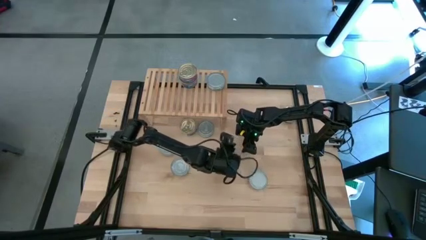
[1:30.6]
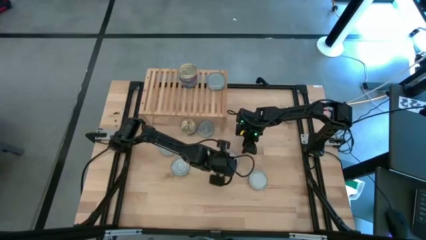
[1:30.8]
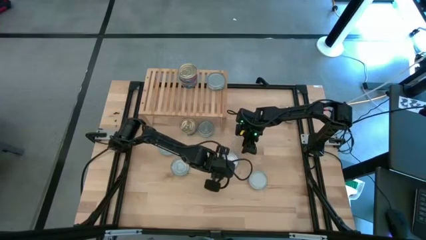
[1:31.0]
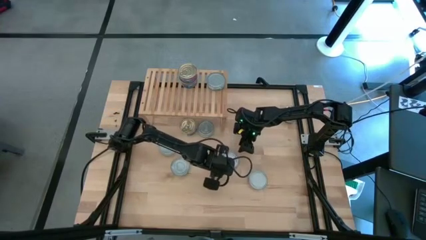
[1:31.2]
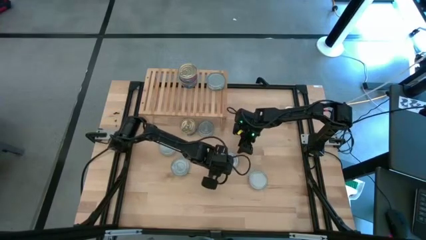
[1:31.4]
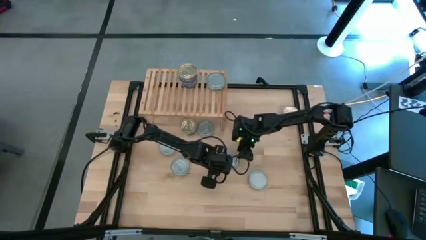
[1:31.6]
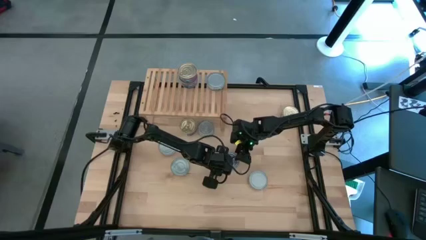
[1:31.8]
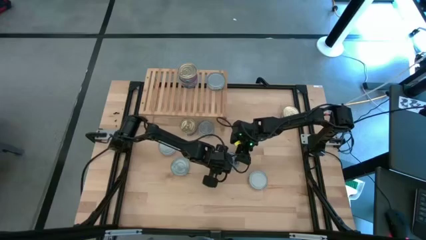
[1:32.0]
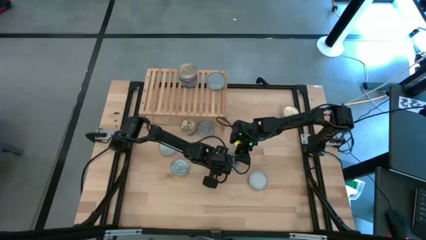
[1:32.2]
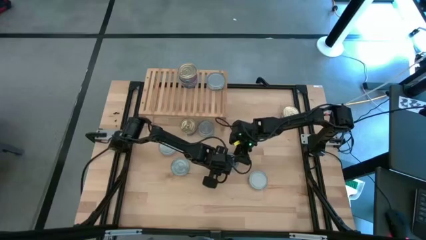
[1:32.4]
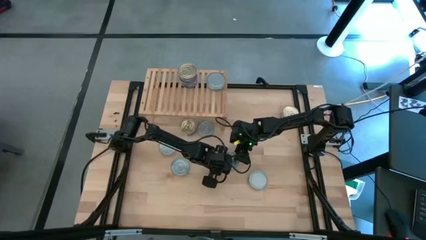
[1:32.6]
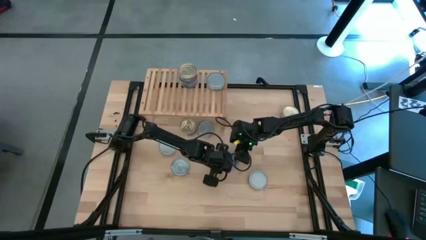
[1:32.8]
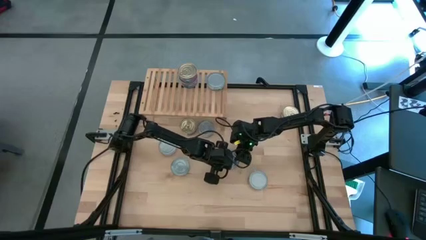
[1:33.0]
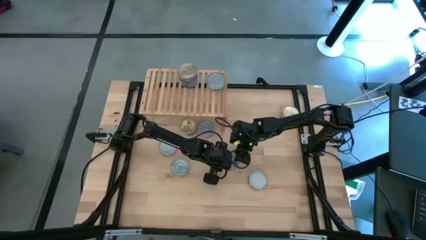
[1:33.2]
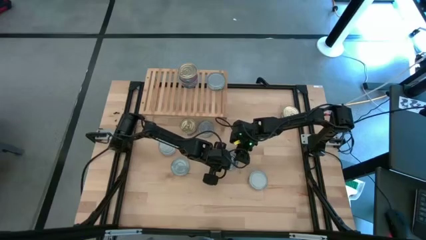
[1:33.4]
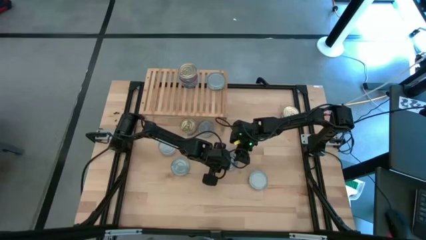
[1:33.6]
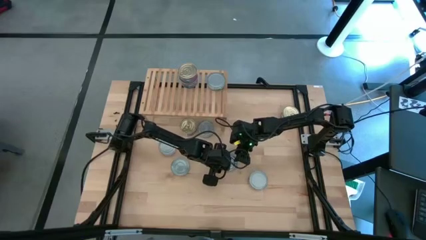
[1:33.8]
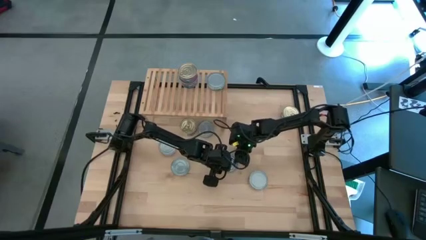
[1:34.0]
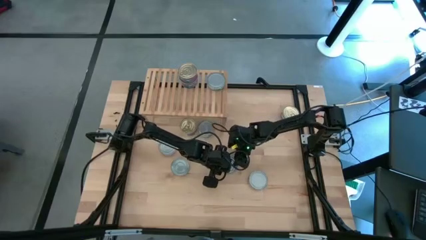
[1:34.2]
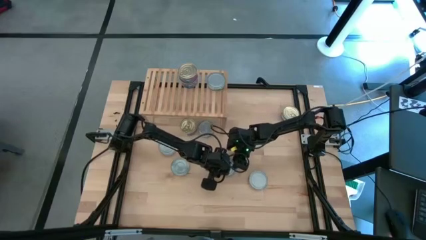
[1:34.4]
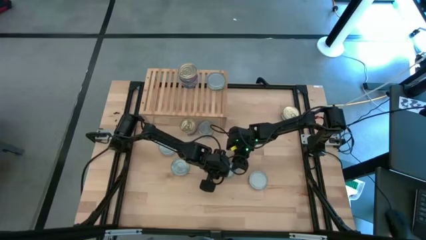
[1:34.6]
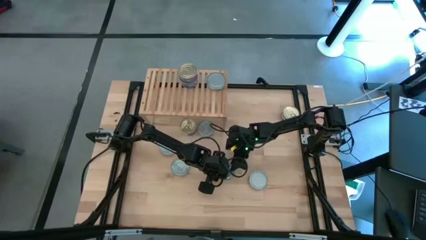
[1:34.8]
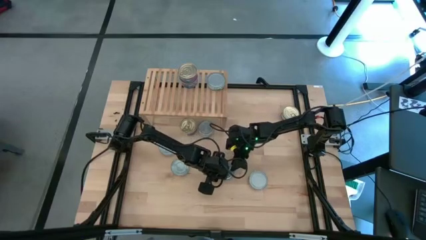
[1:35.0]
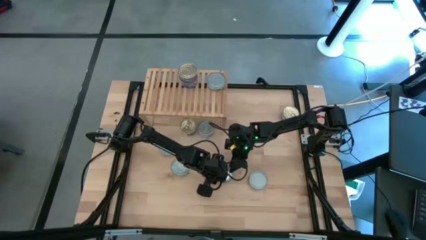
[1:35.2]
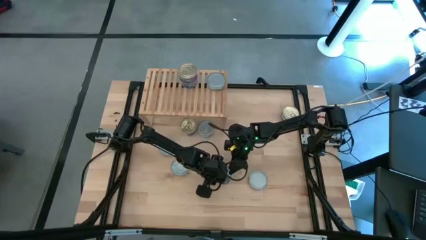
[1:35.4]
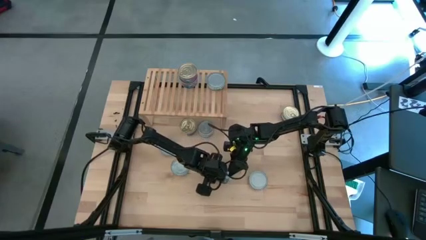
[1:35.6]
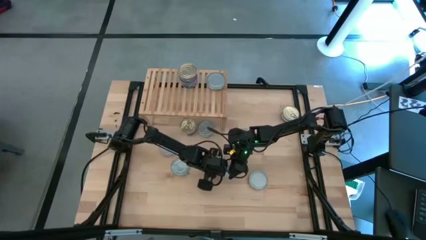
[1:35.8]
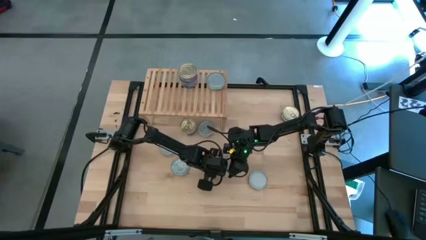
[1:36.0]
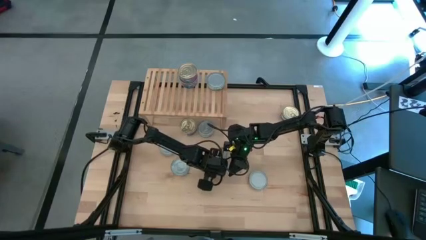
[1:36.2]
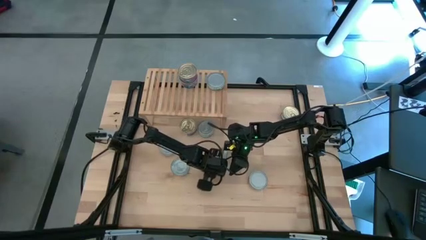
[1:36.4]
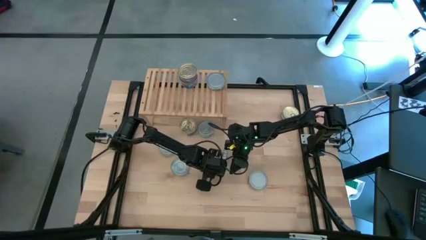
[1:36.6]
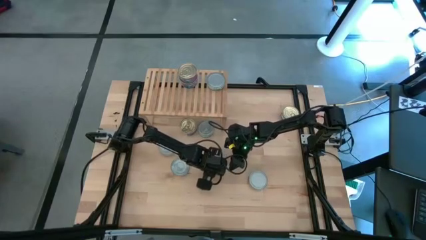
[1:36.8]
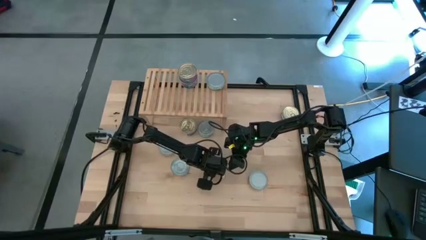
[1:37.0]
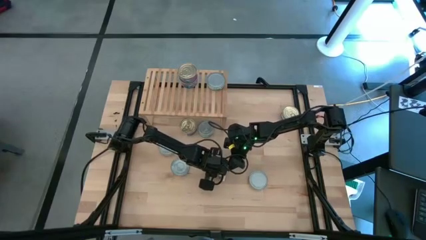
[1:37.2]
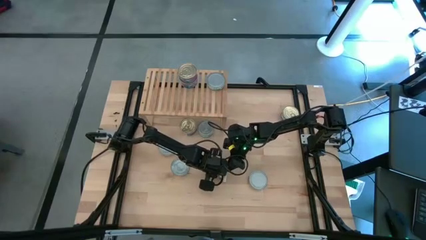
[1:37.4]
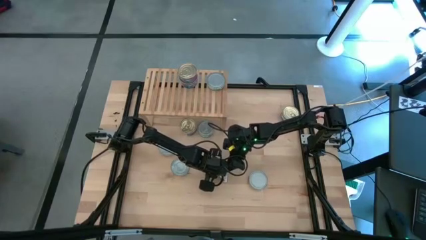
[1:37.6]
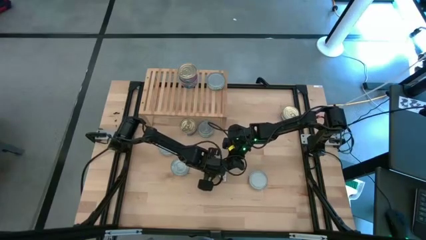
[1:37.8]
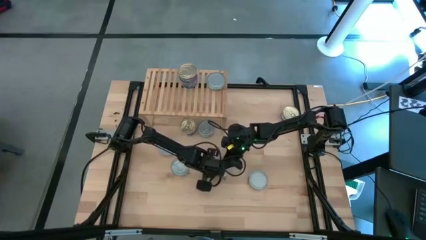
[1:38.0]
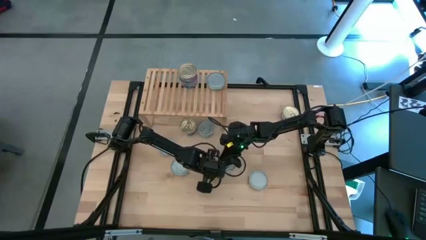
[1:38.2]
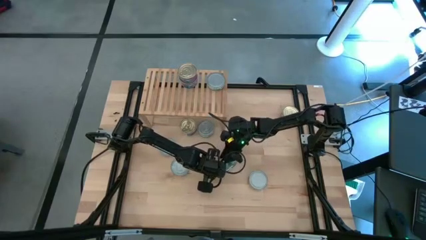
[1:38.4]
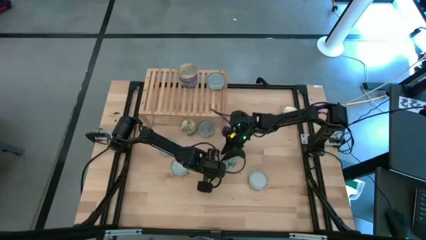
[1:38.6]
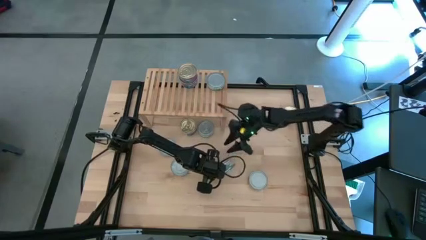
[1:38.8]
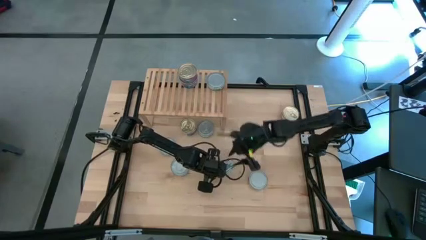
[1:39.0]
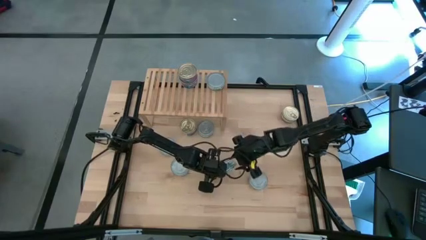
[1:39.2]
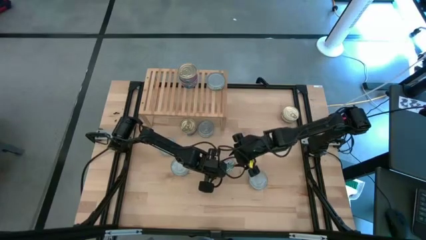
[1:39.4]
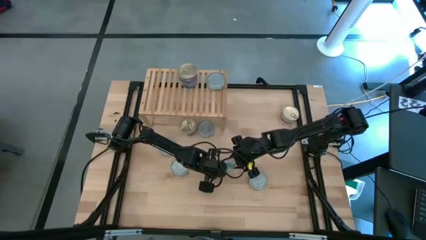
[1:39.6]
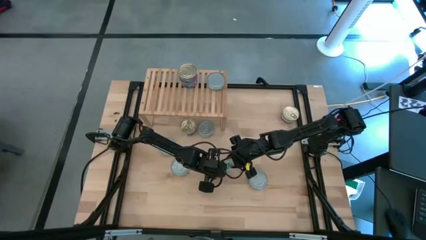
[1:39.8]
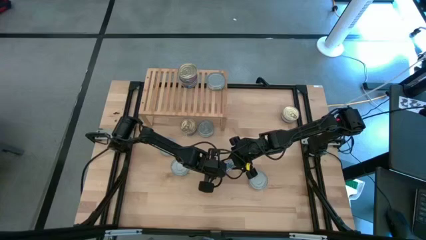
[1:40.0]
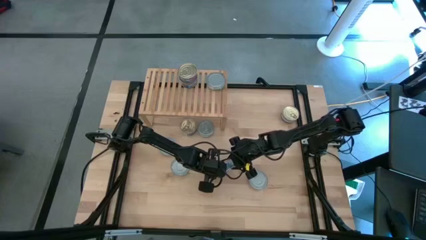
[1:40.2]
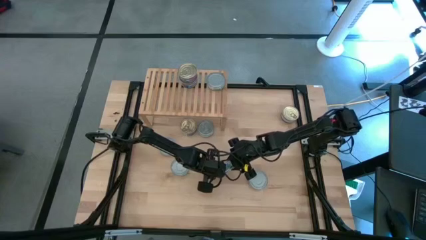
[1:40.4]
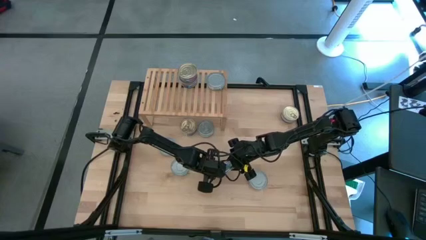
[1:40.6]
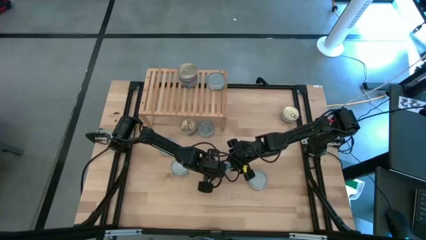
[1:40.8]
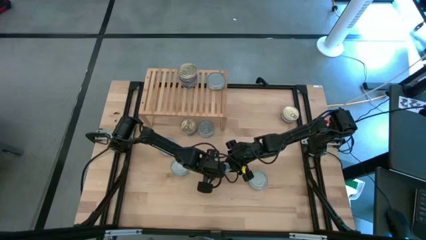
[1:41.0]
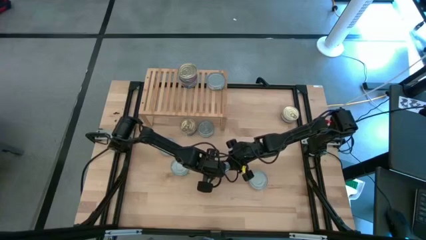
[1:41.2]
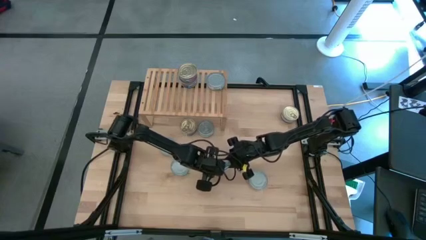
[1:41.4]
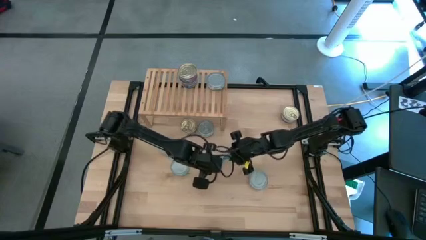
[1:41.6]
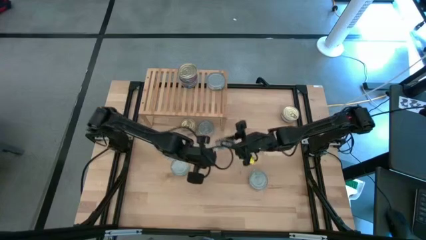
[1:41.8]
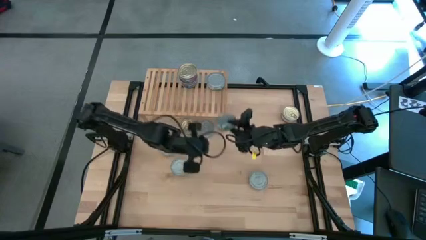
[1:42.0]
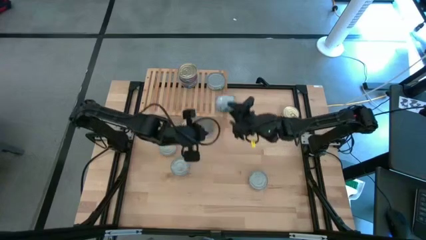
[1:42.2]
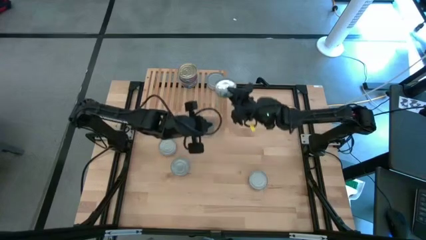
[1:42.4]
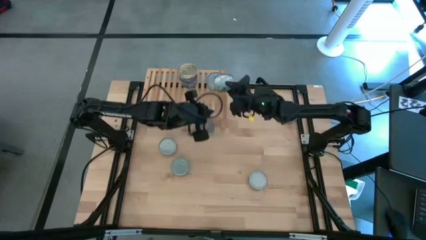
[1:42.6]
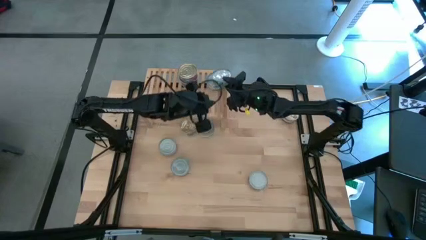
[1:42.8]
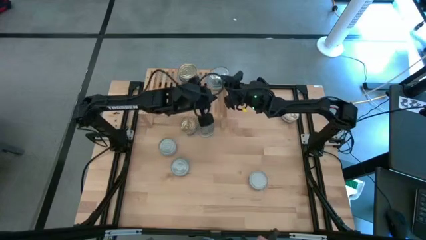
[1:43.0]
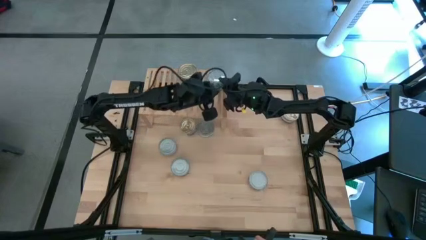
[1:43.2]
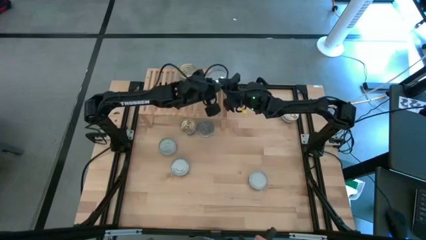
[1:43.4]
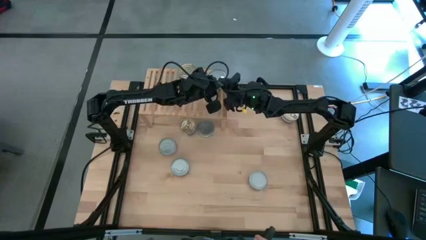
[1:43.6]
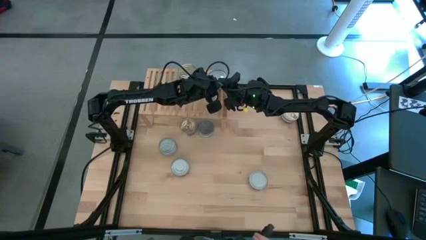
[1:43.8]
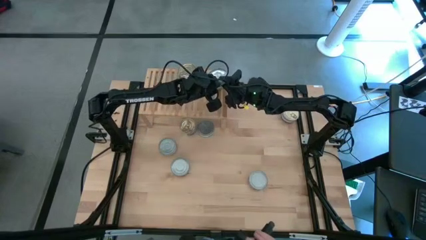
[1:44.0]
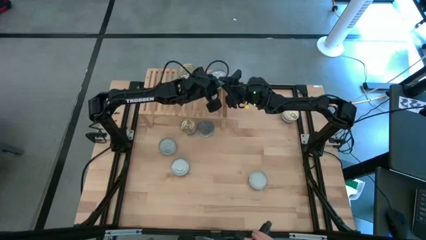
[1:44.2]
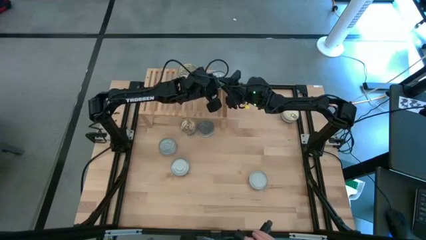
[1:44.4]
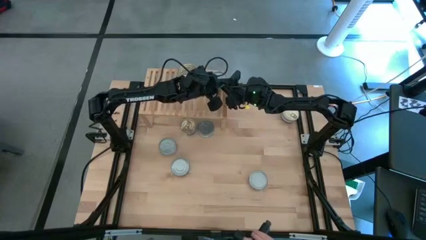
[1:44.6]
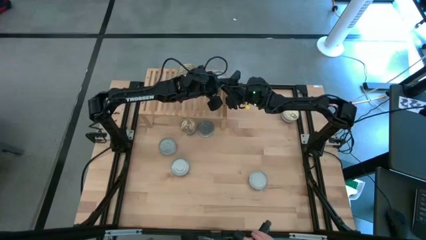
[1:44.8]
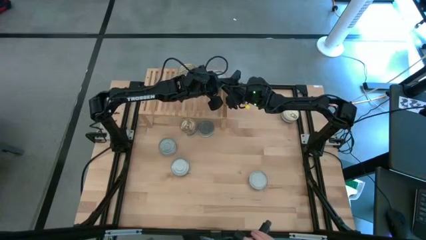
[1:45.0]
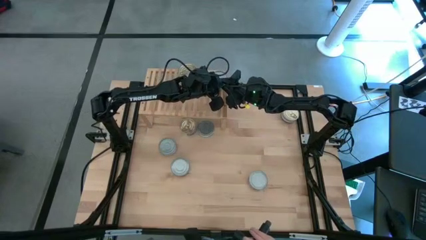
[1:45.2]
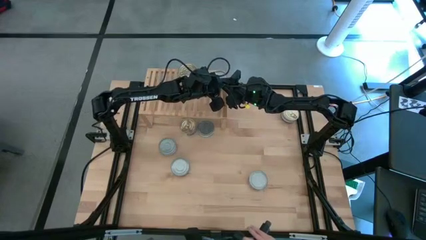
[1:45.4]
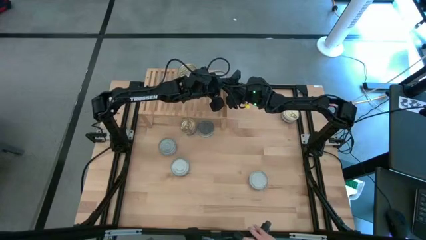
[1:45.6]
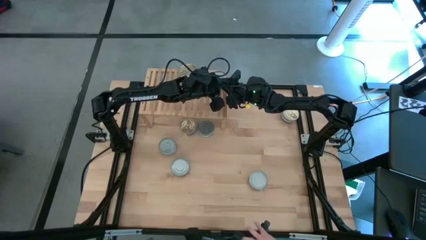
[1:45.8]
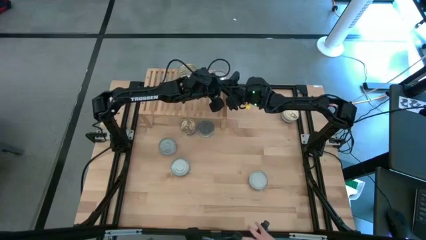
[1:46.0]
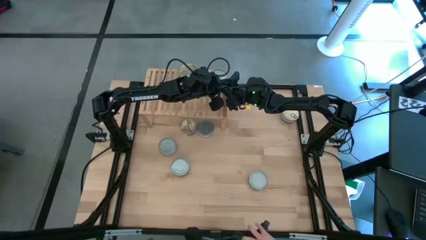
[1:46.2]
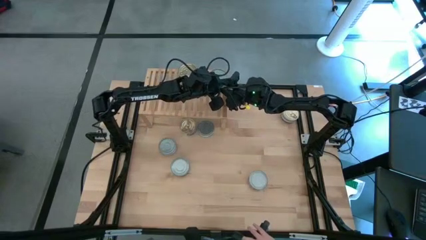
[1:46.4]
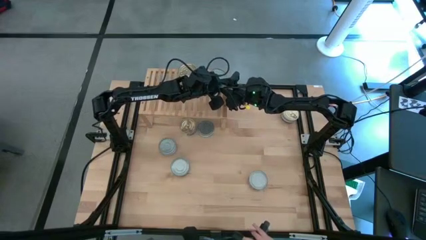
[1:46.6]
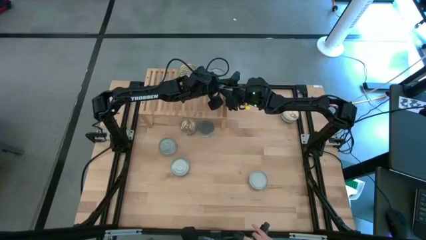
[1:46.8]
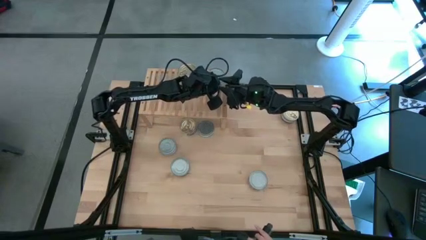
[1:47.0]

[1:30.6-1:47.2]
Task: Stack canned seafood by type on shelf
Stack the green tuna can on top of the green tuna can on the shelf

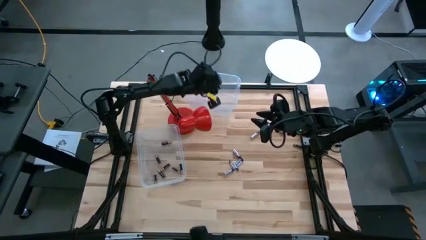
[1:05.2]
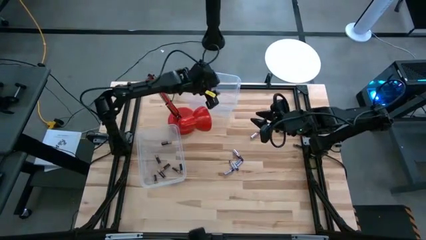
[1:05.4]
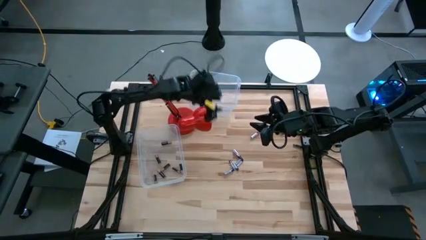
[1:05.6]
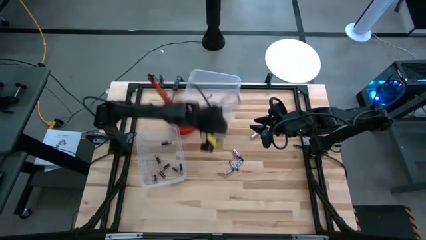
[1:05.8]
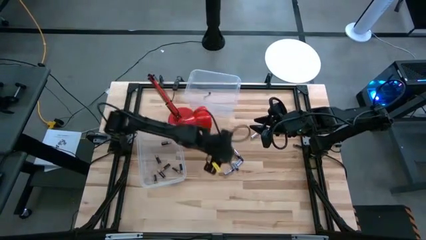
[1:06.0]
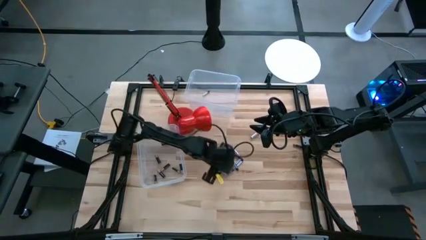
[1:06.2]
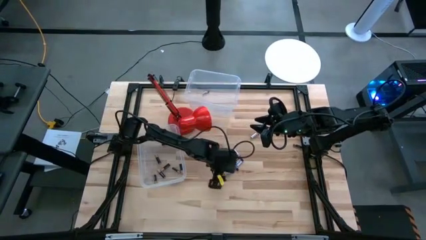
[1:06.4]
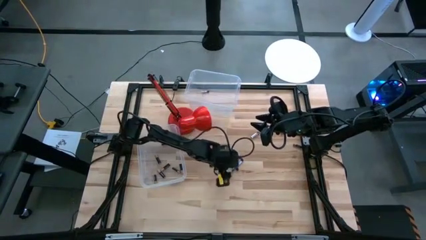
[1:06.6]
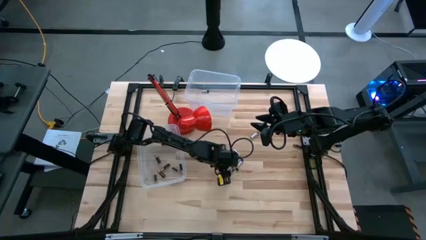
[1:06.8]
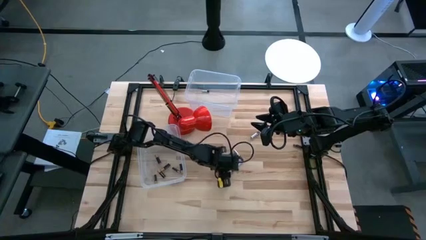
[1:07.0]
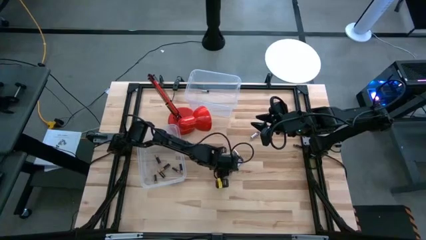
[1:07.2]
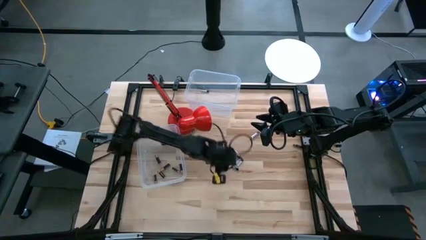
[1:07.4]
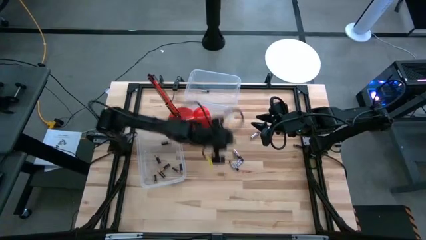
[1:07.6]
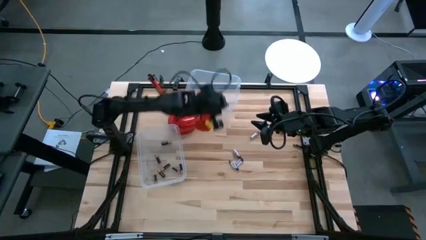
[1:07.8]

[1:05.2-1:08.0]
Task: Sort batteries
Put the white battery into the top transparent bin
